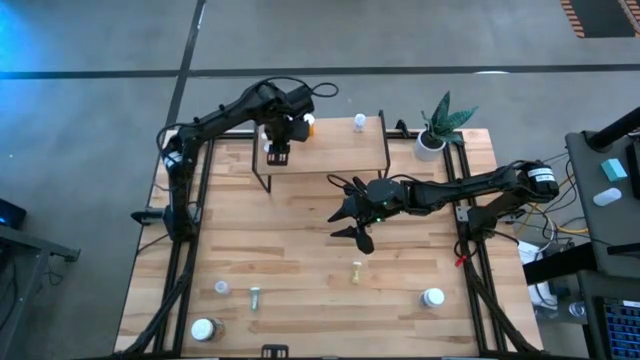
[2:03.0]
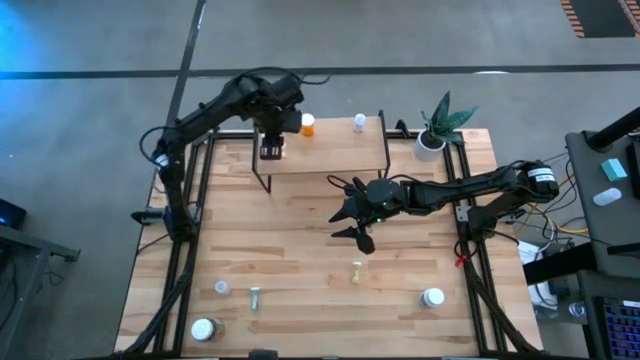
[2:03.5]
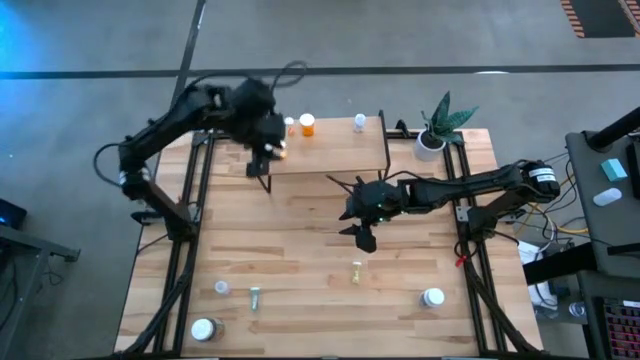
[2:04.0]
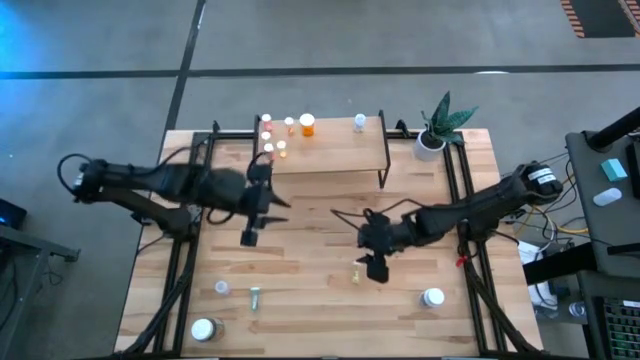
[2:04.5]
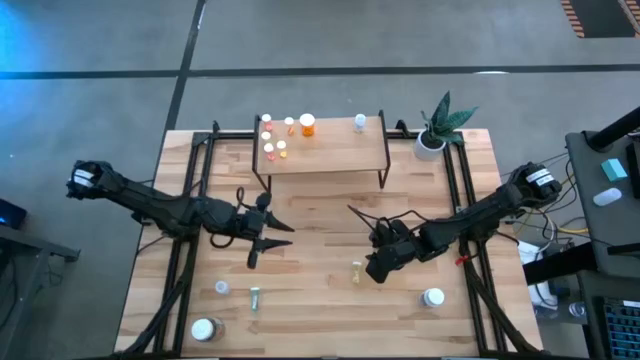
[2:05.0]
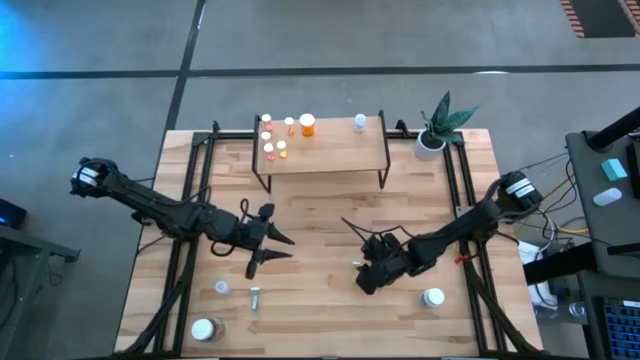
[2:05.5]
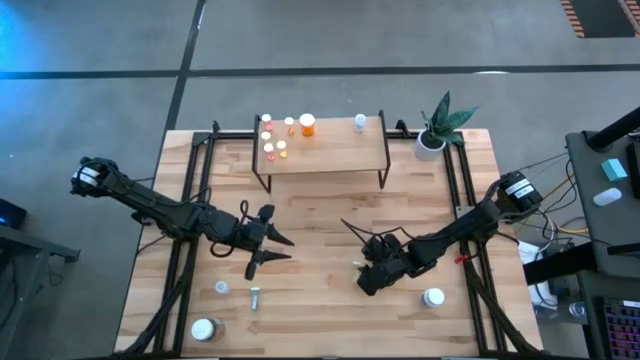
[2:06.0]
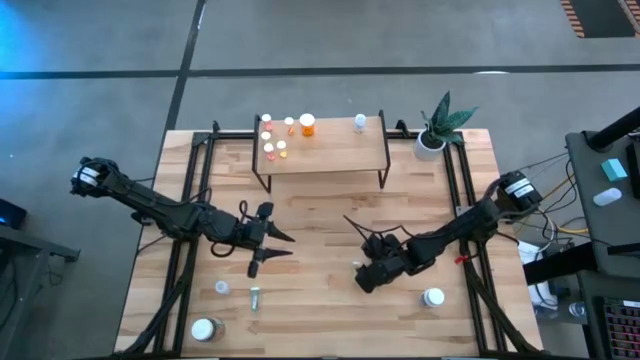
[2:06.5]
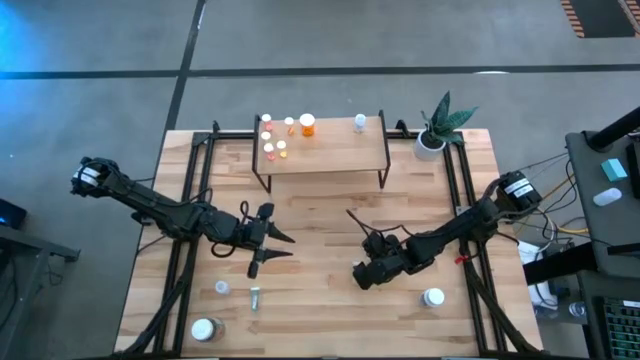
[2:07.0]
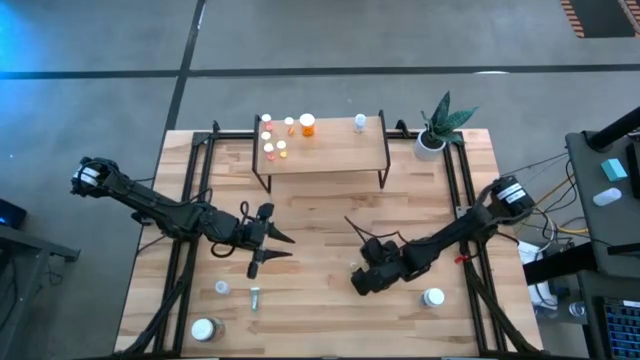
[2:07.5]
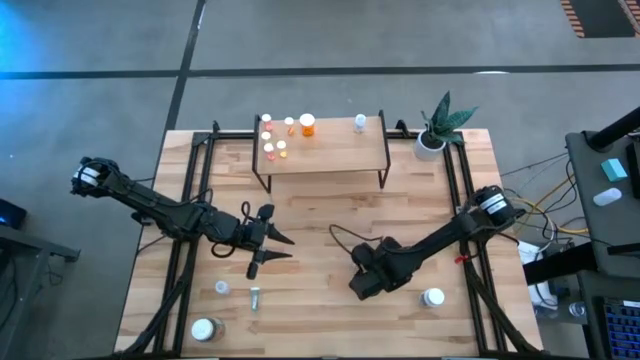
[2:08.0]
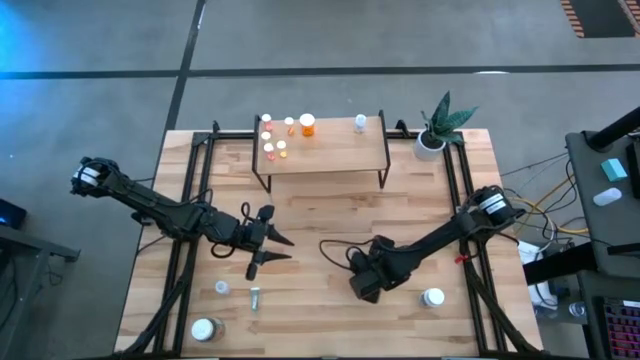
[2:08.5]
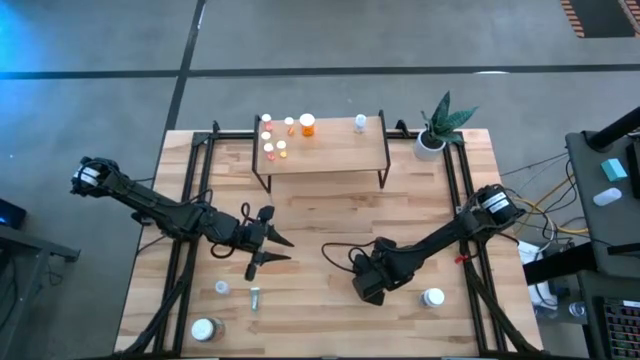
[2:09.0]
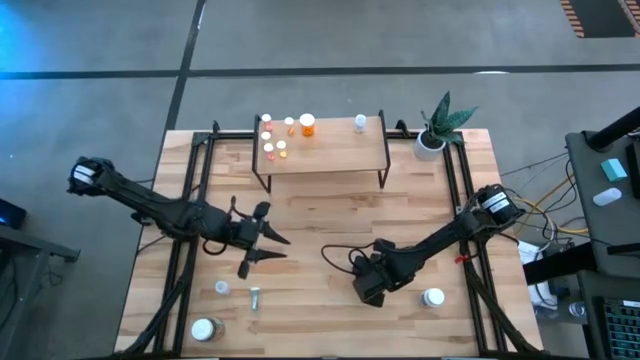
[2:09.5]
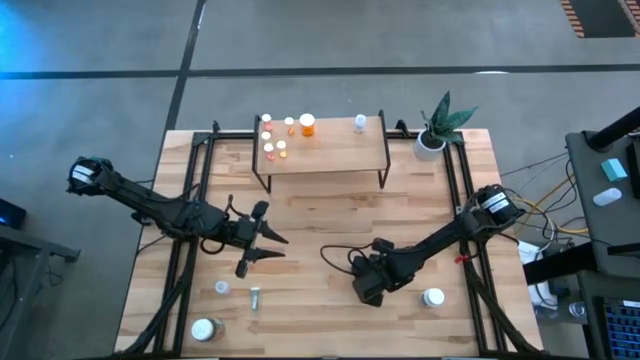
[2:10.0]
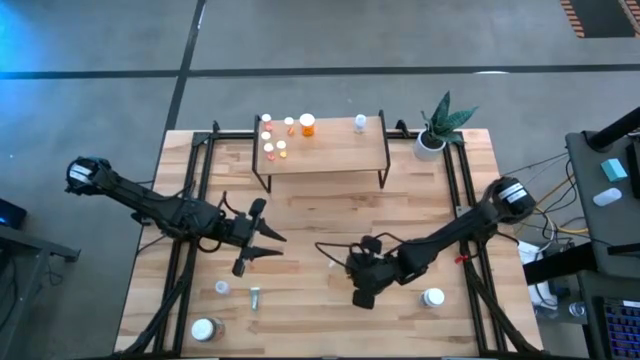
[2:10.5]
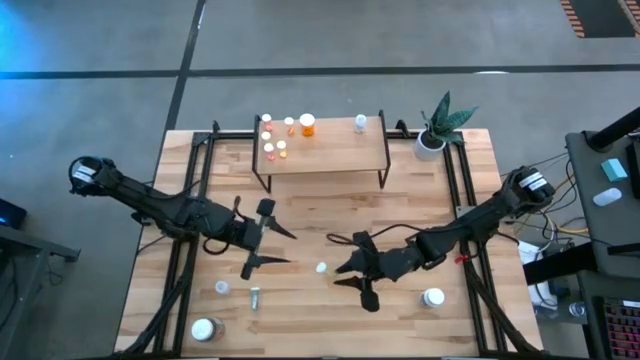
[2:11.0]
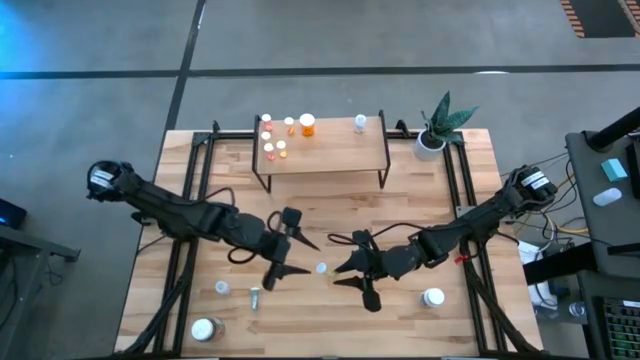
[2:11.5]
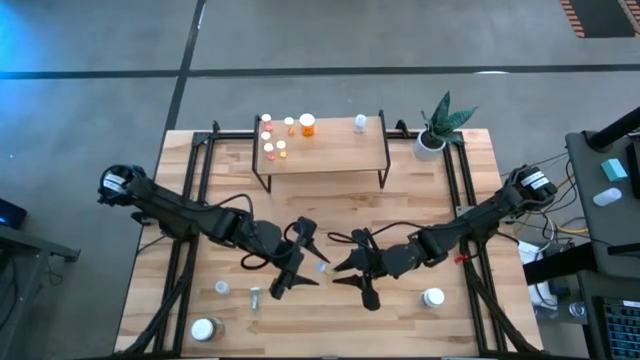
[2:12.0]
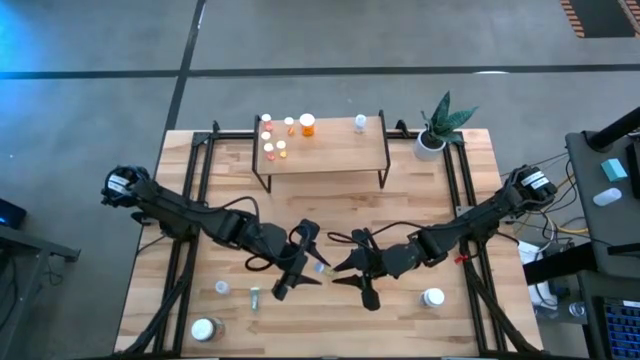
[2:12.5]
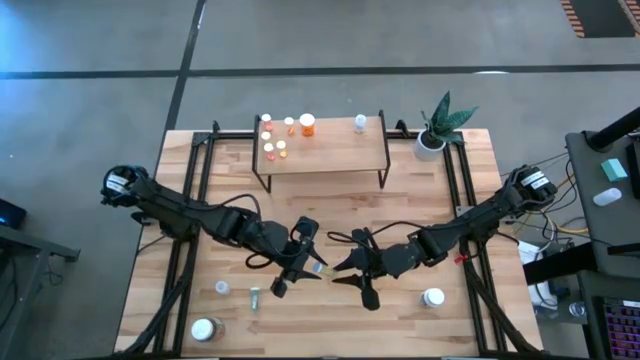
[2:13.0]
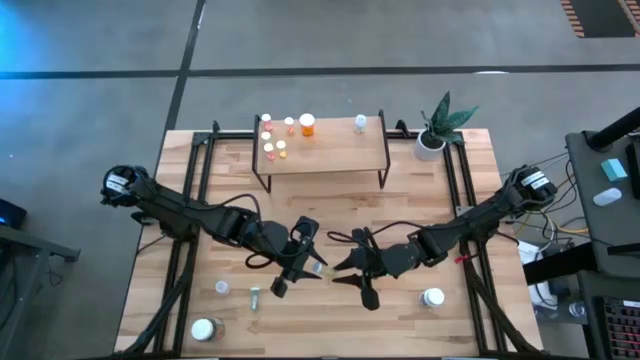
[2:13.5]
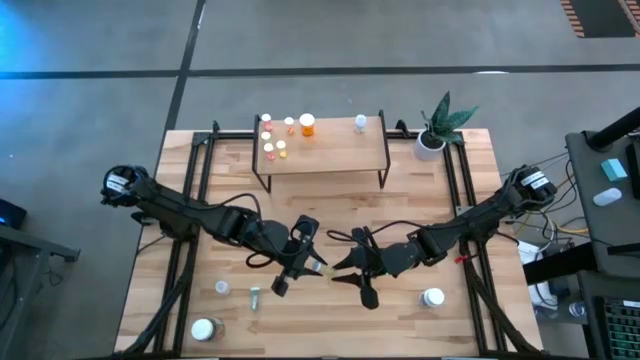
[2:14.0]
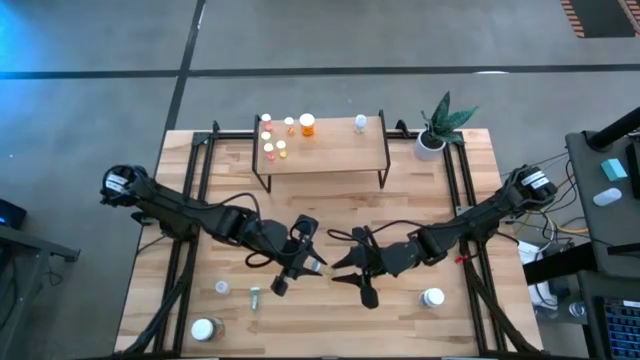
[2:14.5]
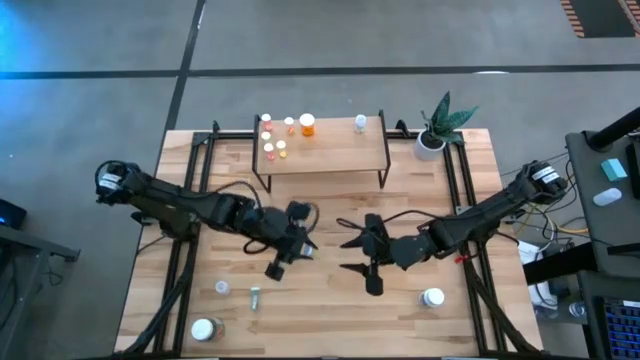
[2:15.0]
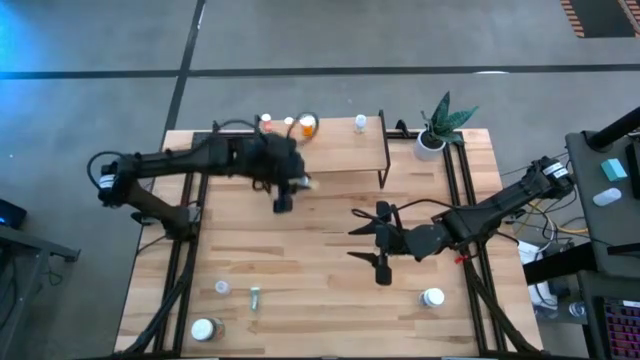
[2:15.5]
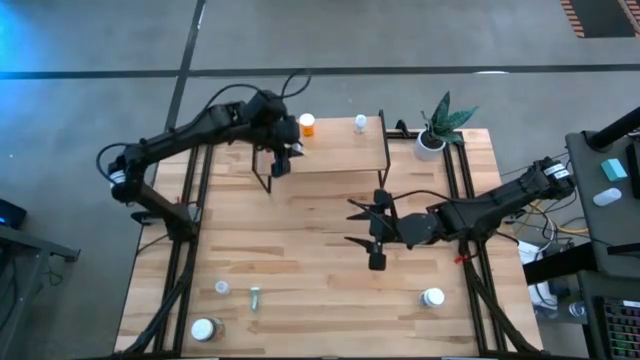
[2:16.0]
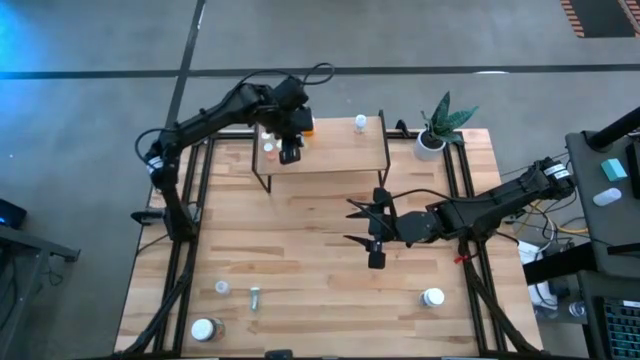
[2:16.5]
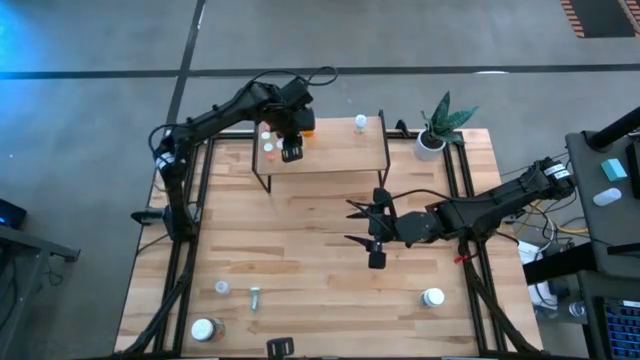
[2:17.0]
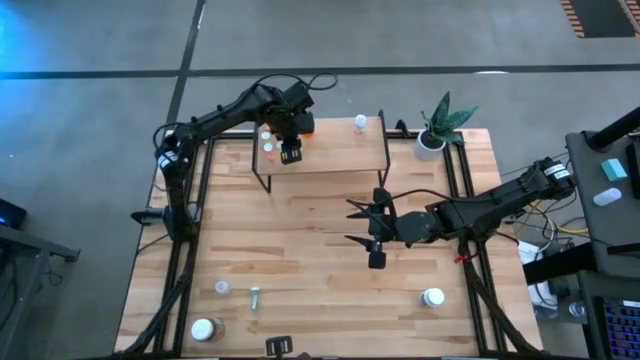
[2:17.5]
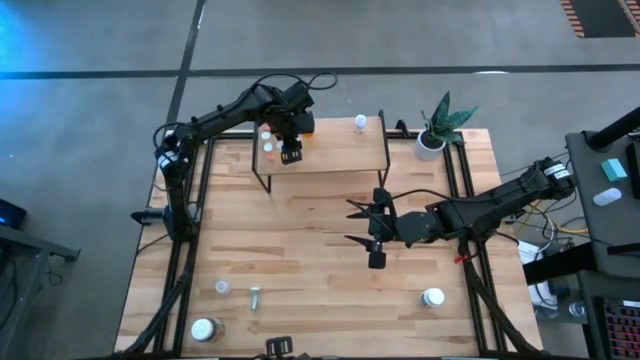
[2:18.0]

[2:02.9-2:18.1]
Task: Pick and place medicine bottles onto shelf by color
Put the yellow pill bottle on the shelf
